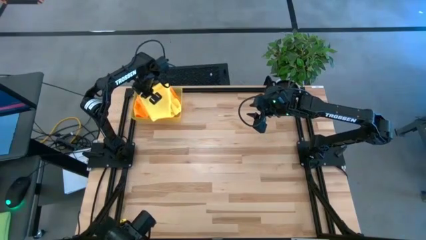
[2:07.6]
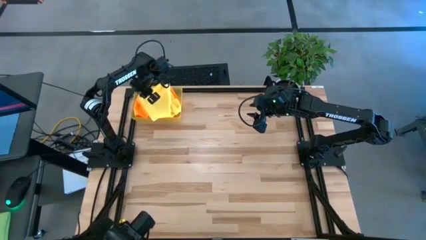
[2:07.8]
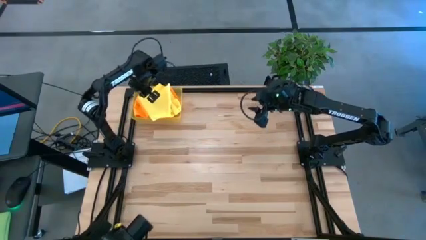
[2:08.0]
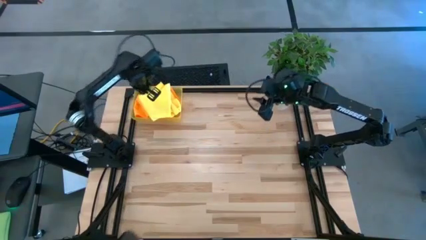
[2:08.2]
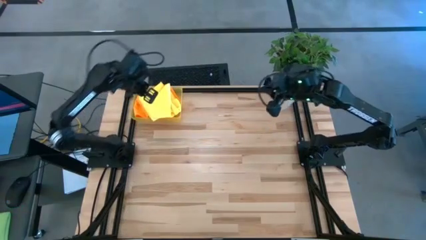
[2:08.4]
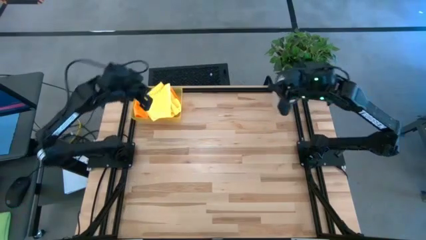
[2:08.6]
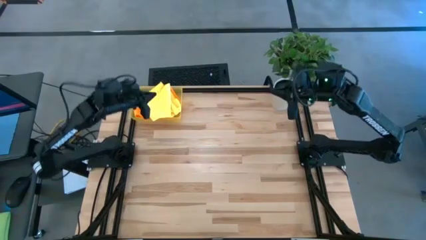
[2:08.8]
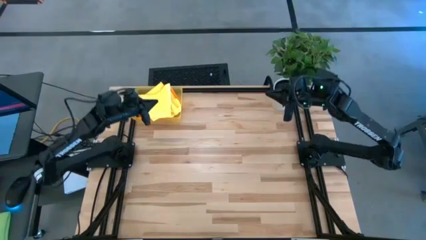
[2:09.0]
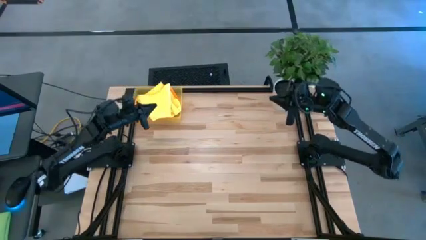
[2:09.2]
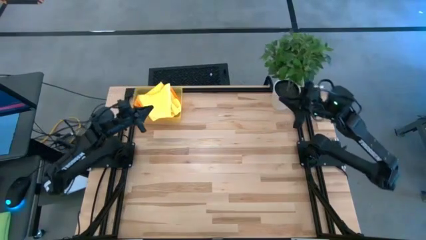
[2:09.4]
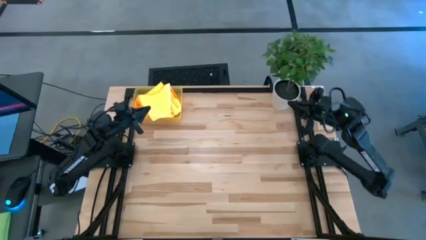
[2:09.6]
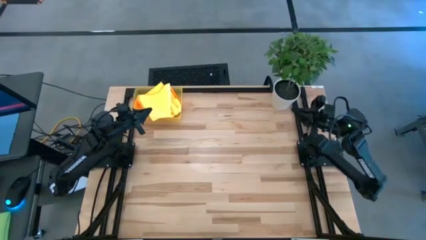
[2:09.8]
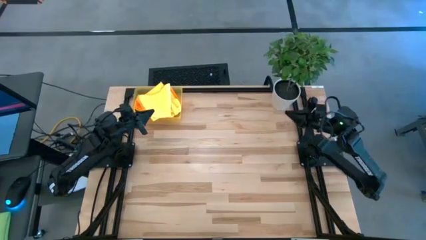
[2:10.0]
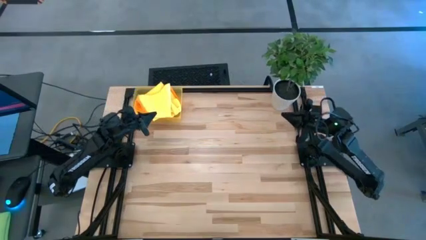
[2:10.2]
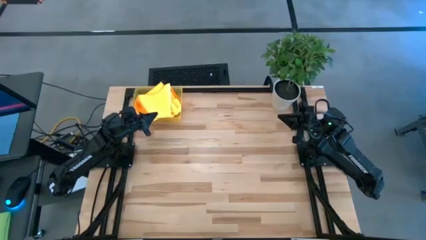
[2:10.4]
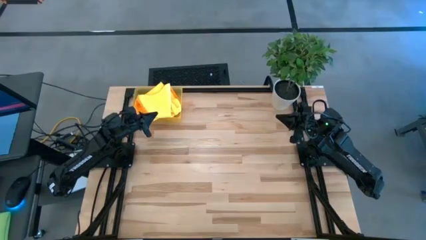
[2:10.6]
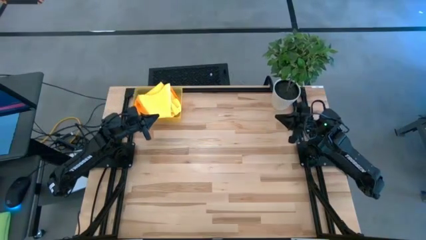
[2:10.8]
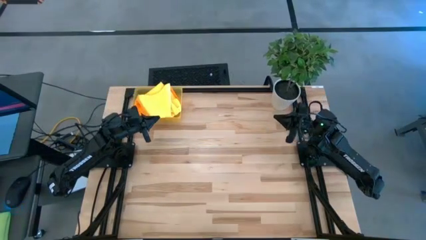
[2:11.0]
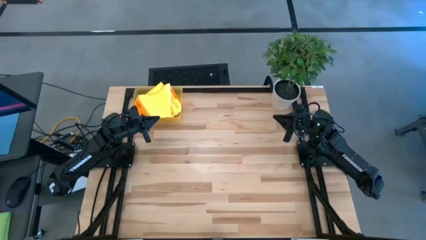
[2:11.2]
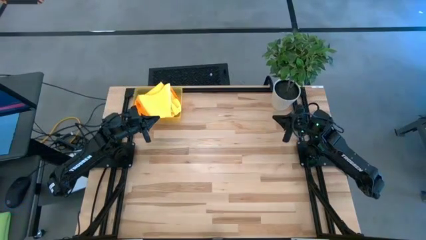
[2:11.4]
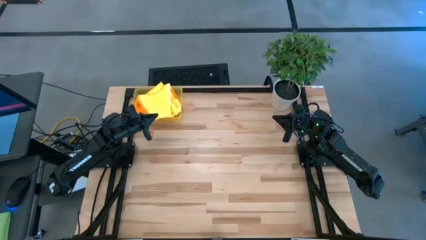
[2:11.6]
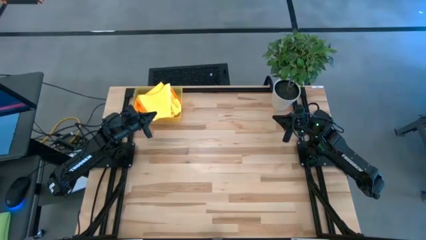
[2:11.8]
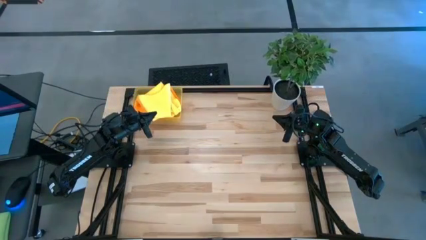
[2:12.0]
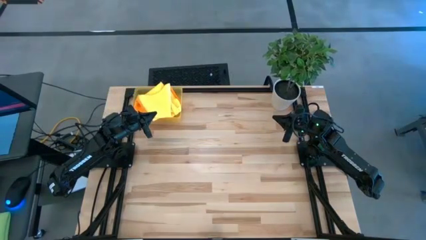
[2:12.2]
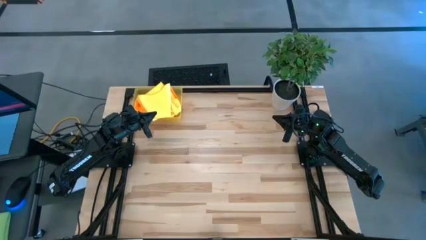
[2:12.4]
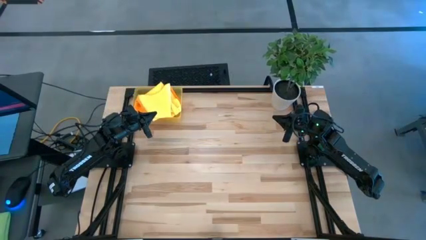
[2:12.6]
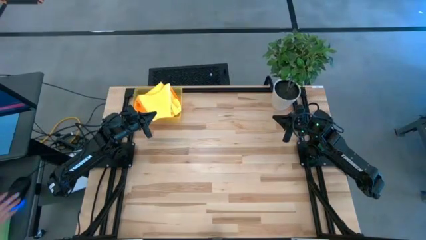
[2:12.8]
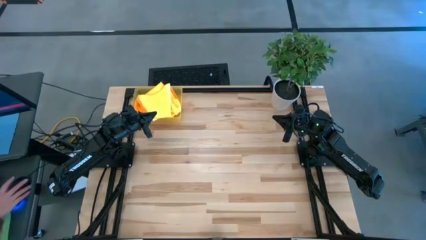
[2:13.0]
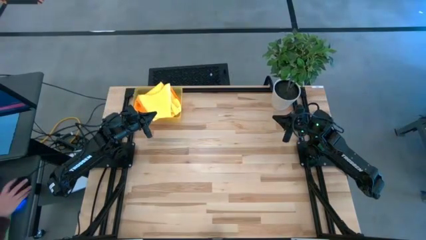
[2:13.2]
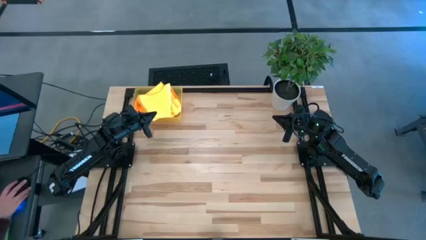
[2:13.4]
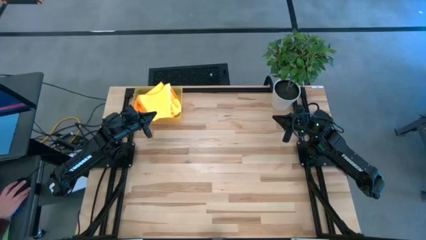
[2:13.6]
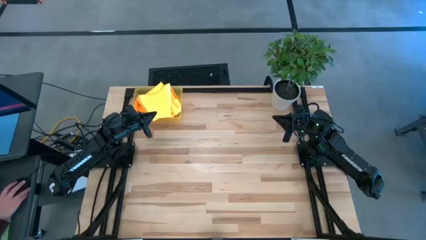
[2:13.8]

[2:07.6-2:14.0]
Task: Fold microfiber towels
Return to Home Position

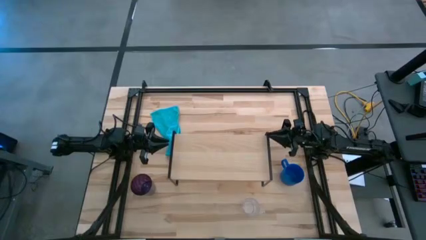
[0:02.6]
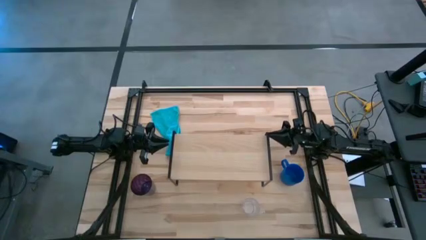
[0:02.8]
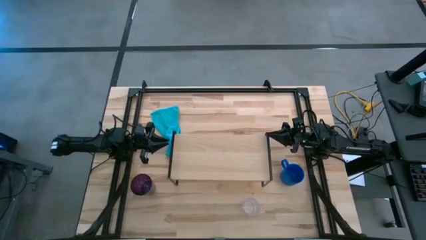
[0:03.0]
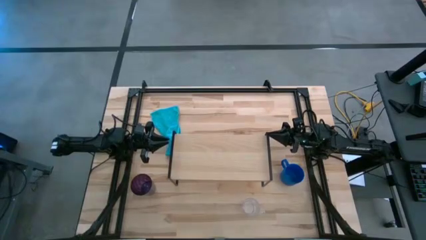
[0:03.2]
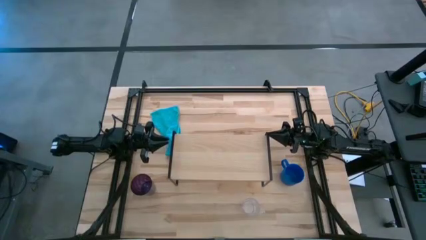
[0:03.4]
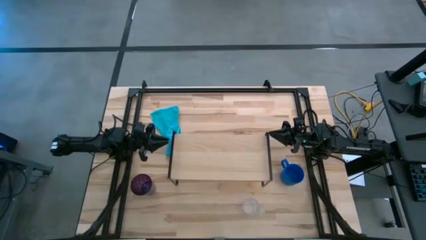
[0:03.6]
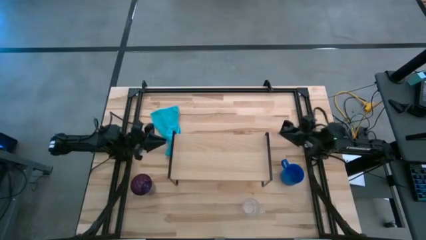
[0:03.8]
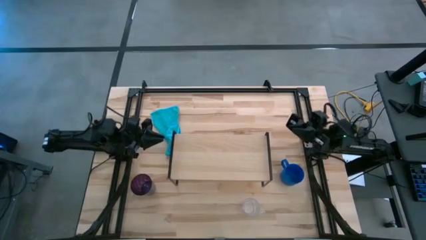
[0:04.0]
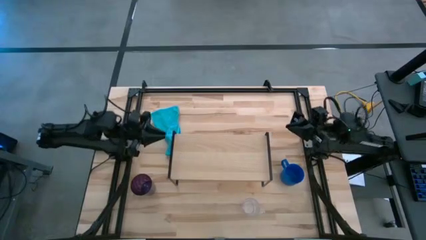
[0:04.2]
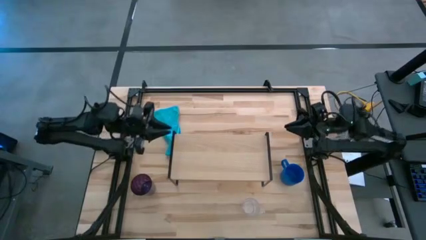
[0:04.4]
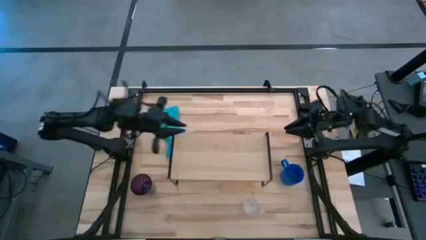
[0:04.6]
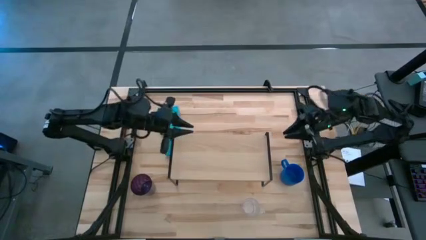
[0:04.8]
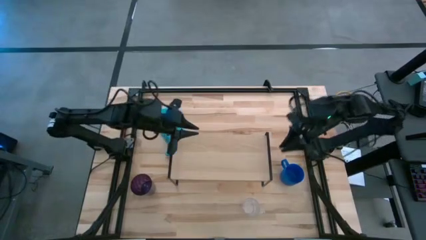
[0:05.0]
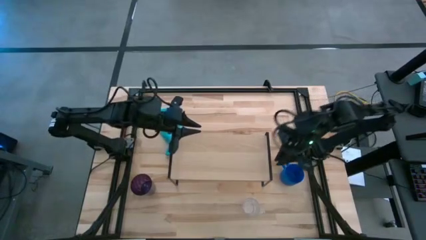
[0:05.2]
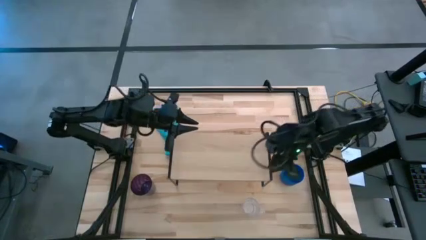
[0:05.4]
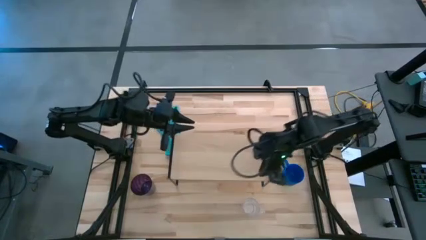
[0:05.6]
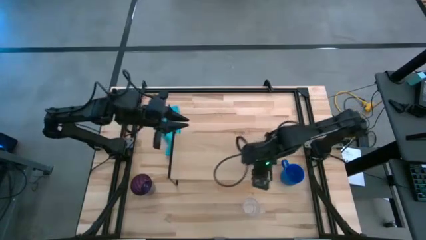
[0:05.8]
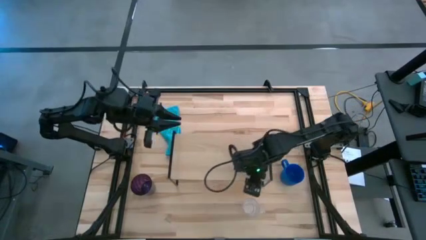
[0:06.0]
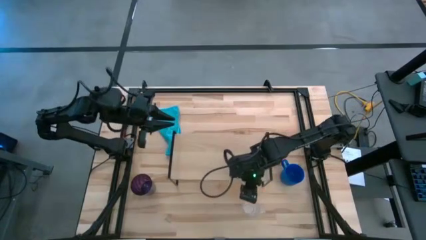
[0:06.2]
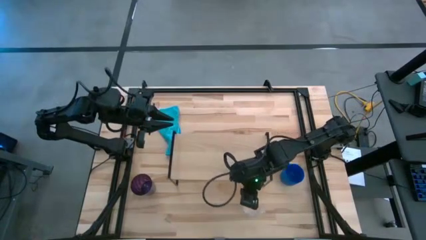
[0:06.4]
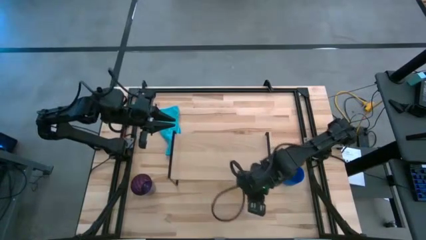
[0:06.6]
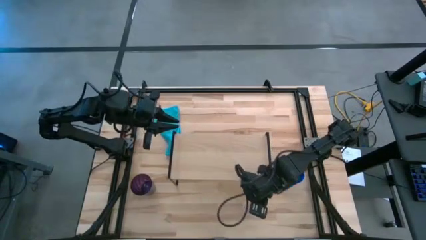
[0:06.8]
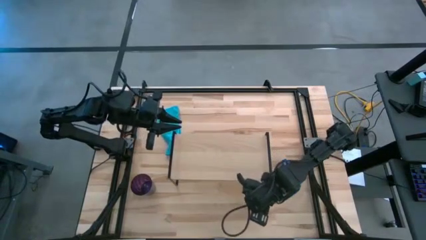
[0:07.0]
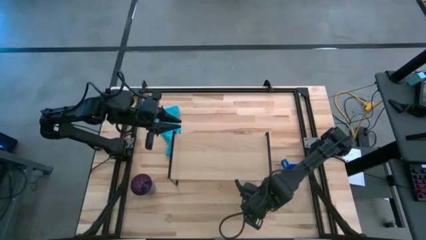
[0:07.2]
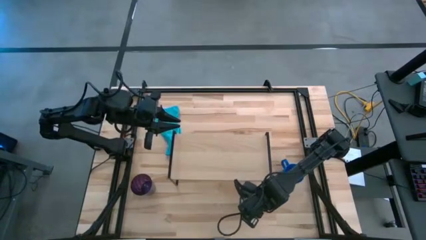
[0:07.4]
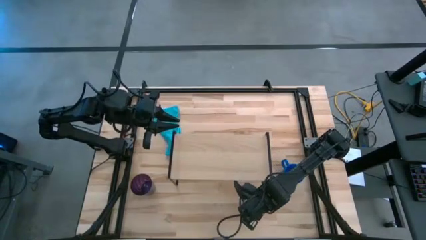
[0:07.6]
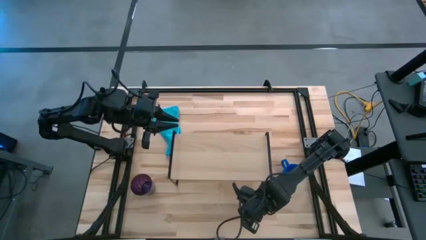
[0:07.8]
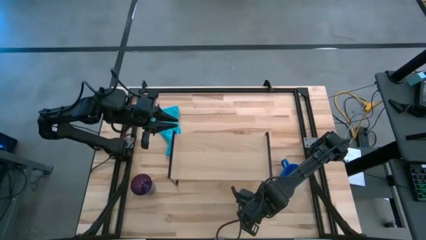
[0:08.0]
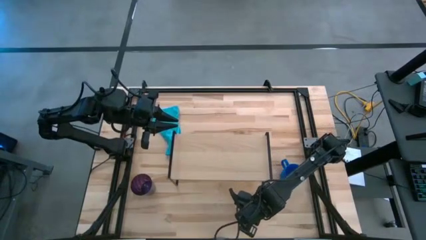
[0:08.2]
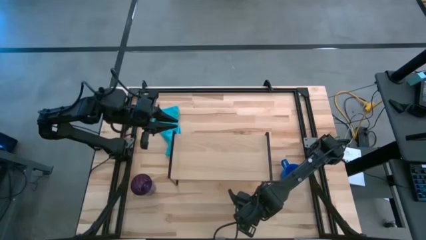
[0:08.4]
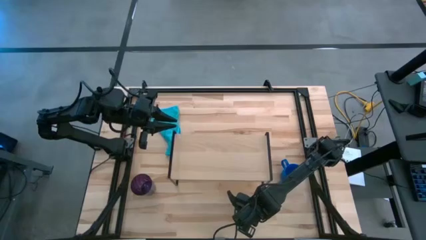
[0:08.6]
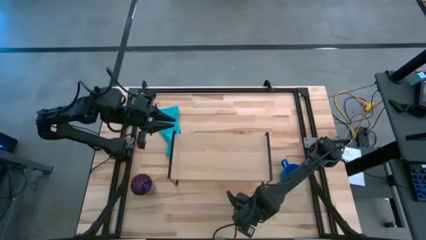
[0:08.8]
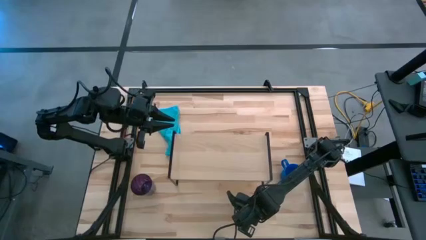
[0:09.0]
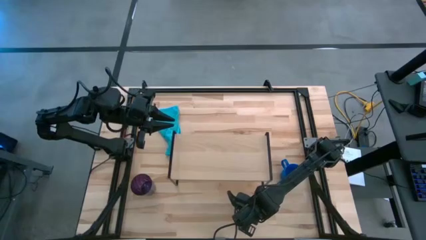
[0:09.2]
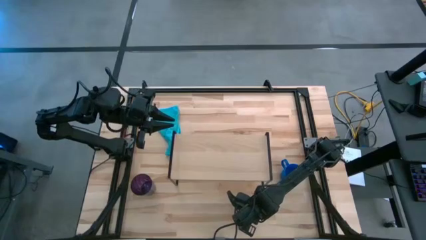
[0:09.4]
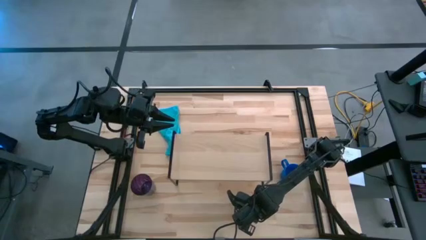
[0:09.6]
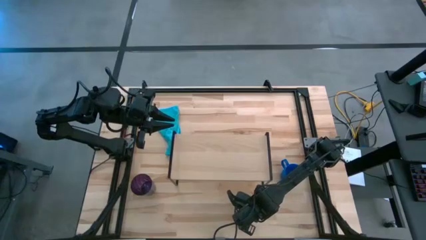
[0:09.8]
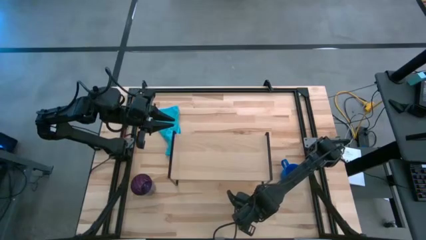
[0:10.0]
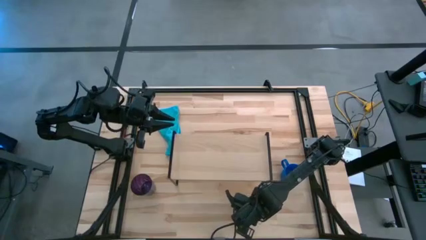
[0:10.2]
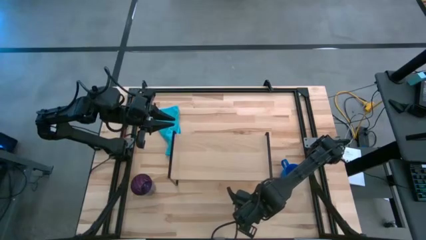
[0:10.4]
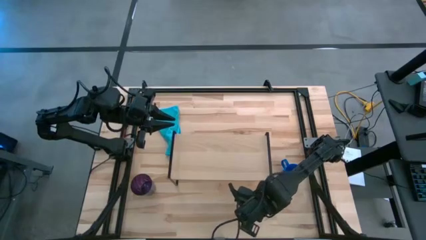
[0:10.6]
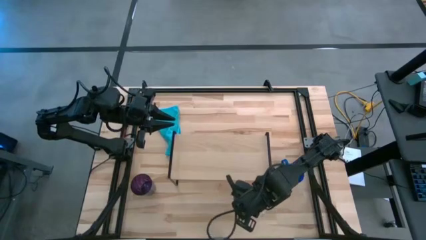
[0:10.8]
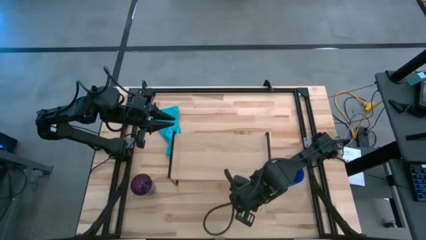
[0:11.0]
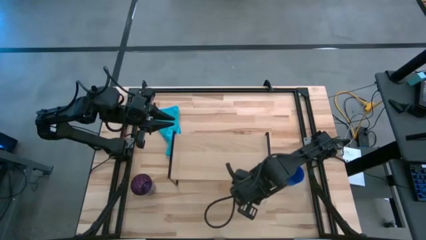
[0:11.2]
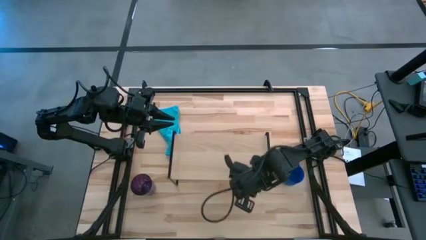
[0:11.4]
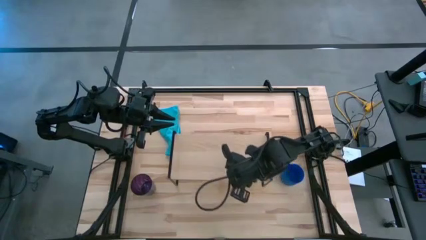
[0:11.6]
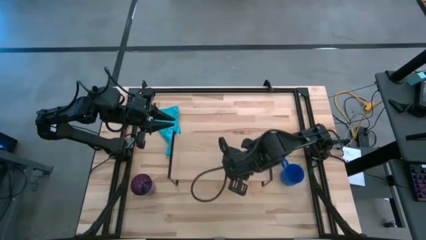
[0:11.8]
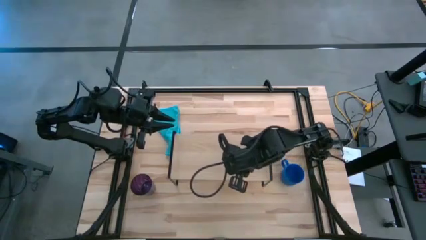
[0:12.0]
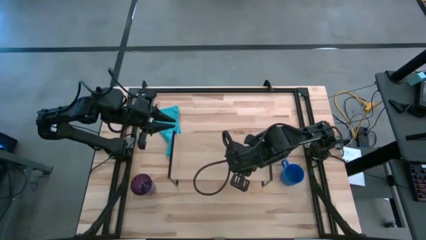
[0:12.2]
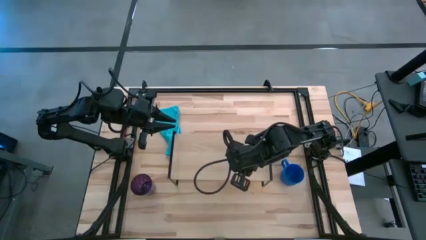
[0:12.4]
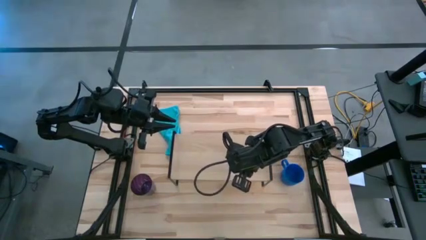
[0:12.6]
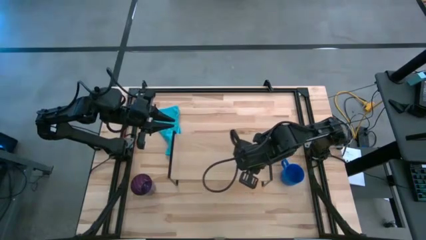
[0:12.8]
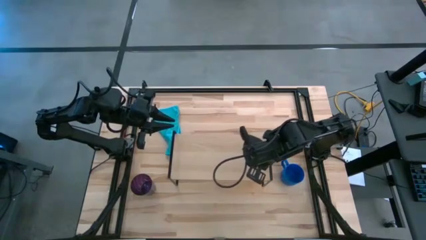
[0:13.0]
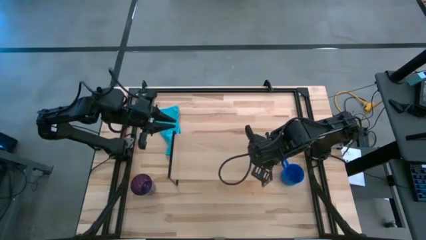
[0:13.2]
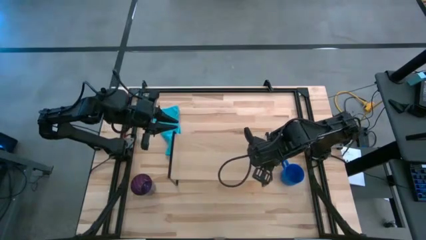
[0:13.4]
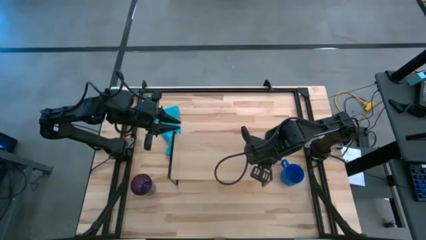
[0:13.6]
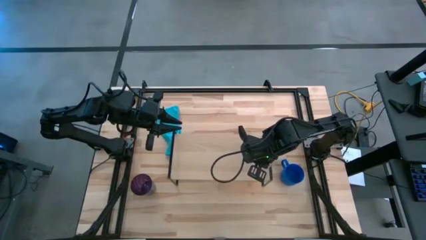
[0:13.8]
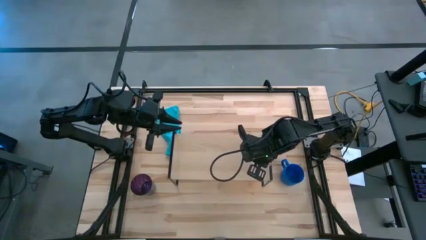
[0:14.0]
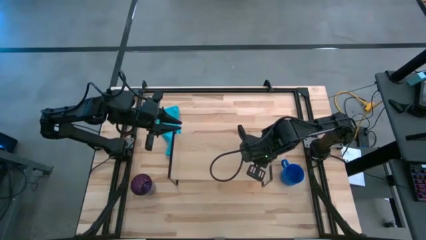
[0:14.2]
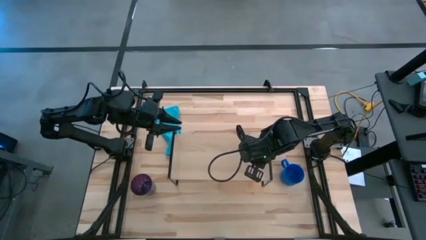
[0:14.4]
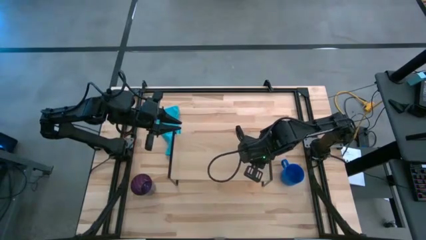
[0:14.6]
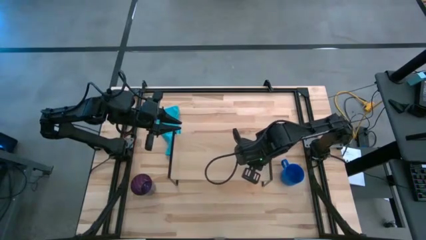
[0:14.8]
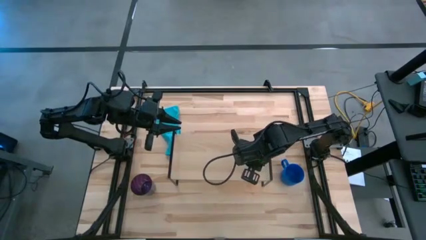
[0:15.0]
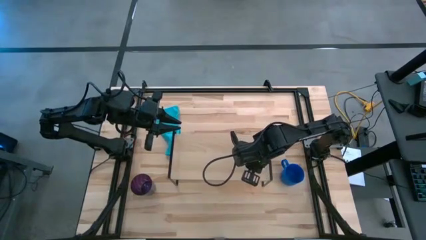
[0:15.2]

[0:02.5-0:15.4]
Task: Stack small to large cups/mugs on shelf
Put the transparent cup on the shelf
